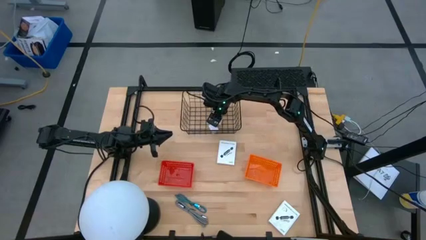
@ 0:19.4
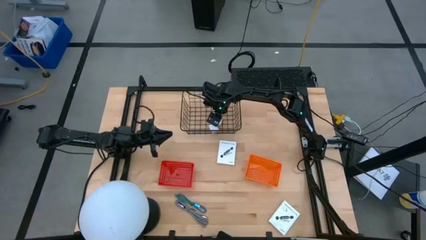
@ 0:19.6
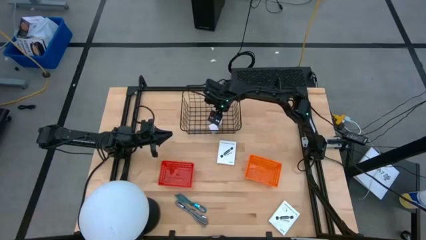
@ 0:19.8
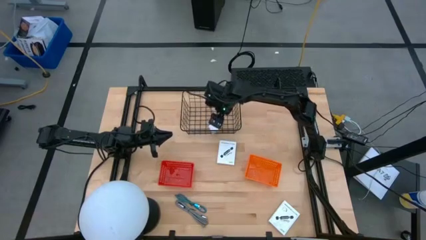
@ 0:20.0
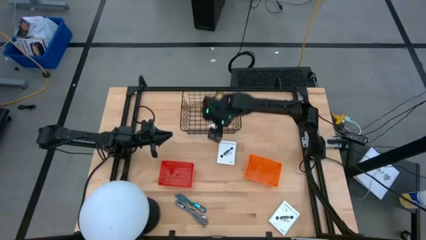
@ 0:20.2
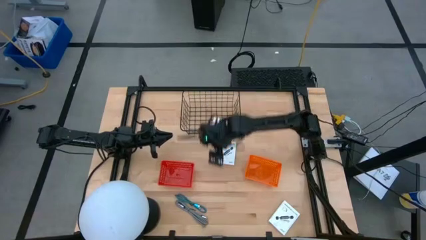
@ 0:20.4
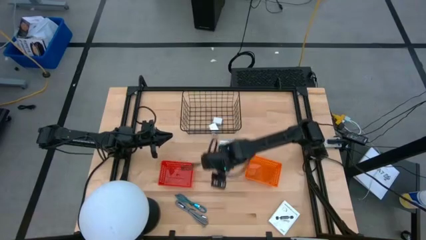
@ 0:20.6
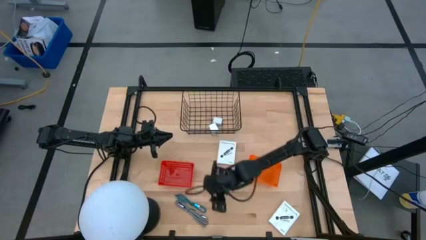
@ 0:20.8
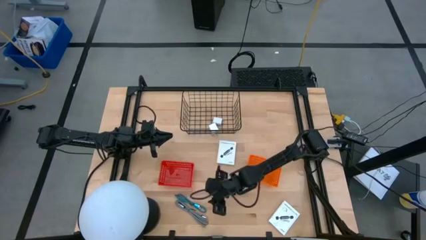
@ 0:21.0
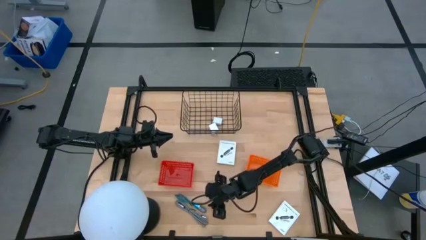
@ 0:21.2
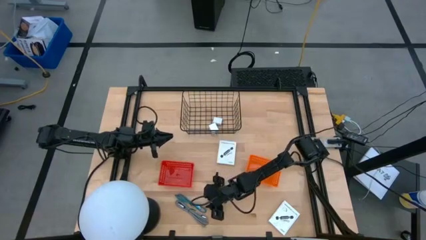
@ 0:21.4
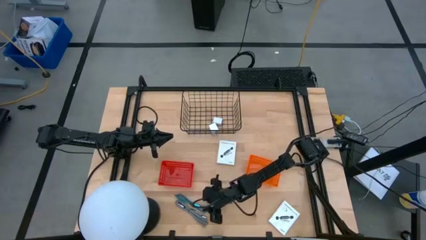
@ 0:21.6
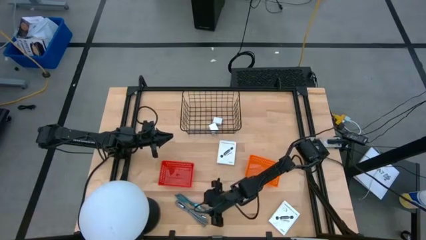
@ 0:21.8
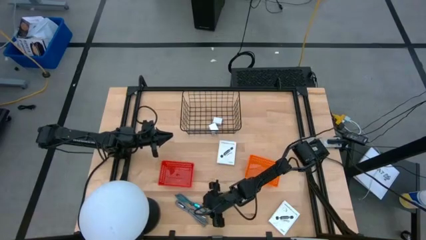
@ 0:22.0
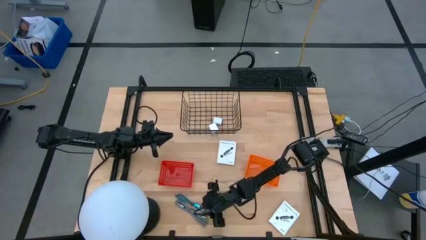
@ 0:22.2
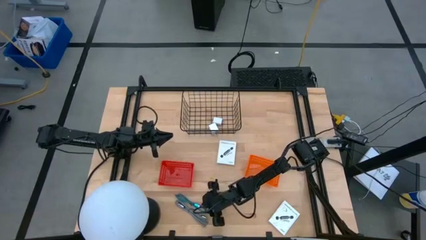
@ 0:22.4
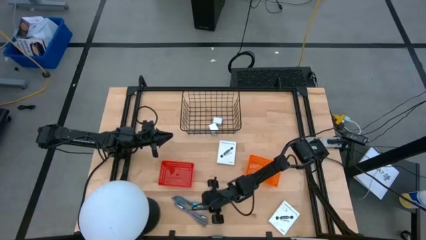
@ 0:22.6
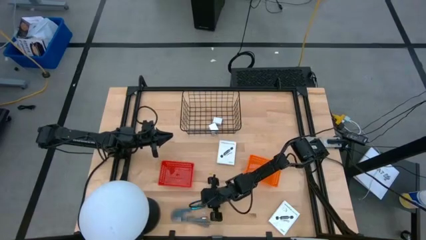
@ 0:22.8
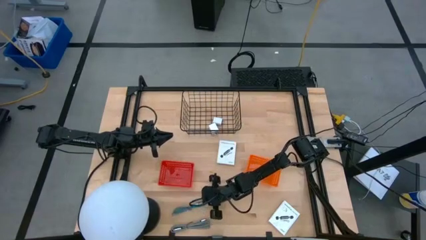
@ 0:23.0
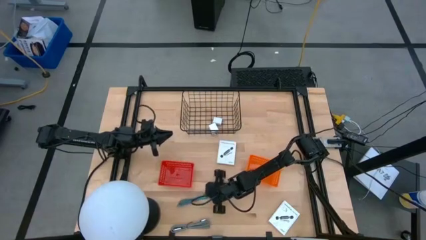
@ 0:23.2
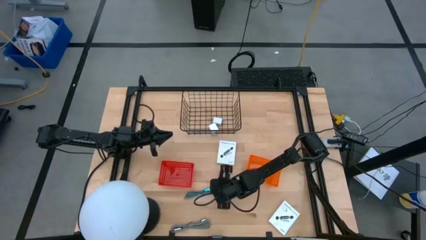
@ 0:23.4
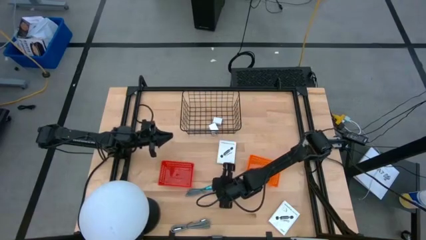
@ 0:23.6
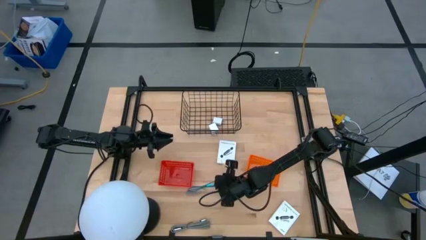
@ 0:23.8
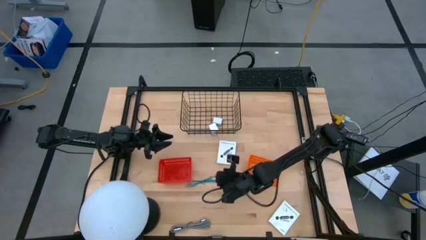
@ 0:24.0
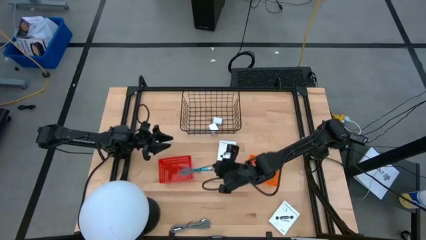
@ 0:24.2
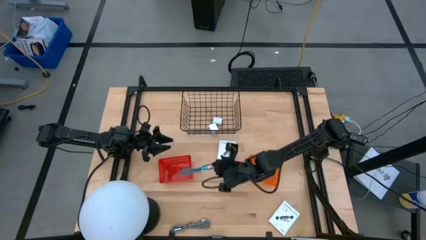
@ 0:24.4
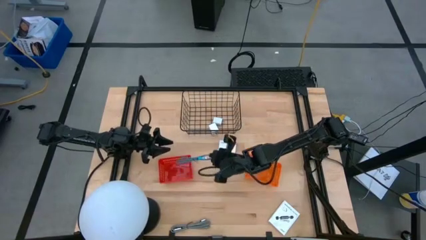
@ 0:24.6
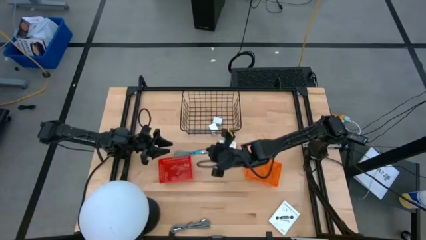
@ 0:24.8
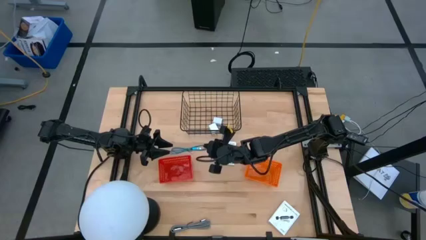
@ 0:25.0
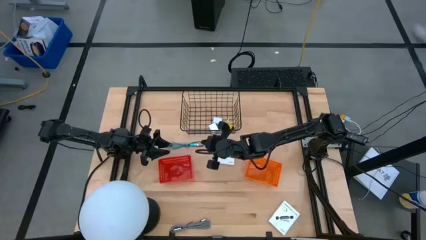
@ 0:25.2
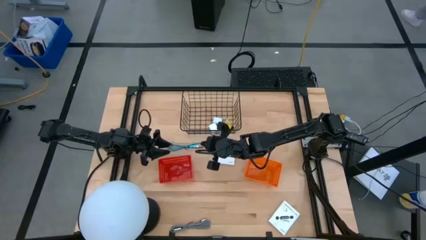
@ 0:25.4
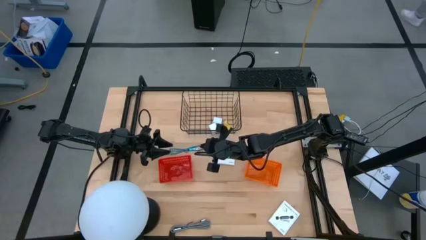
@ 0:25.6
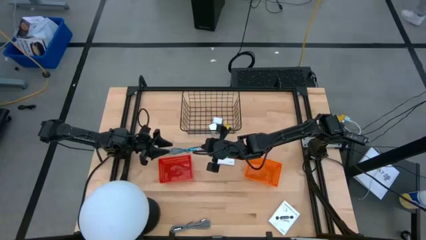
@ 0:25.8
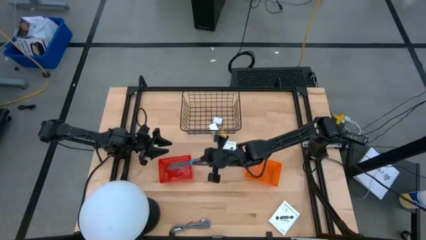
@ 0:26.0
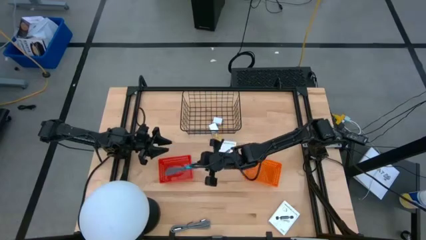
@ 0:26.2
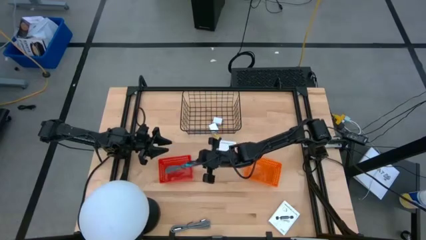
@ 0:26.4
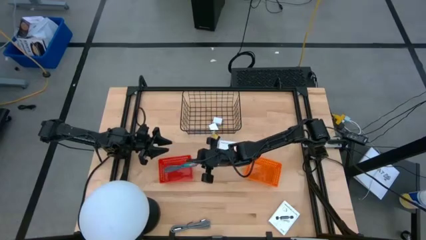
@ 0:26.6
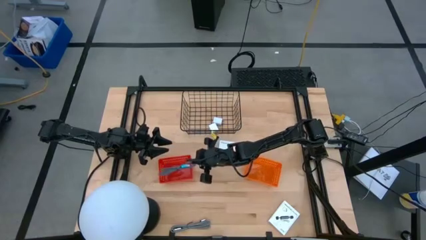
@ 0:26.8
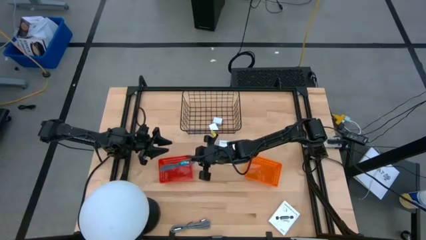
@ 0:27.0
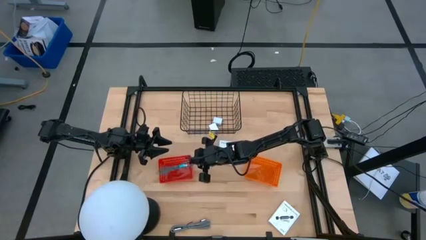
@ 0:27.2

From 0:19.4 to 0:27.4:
Task: Pick and place items into bin
Put the blue charger cable into the red basket

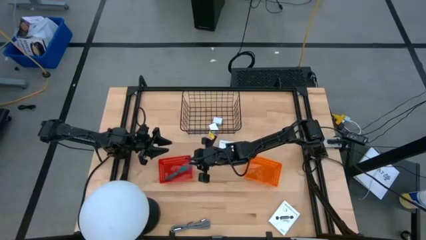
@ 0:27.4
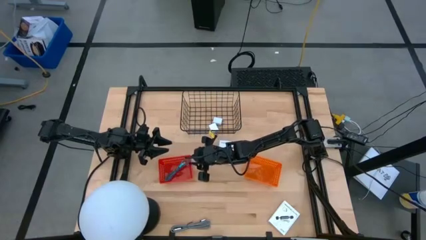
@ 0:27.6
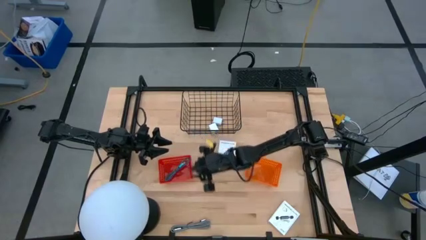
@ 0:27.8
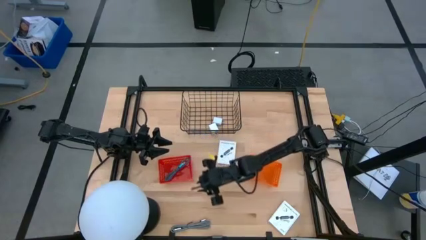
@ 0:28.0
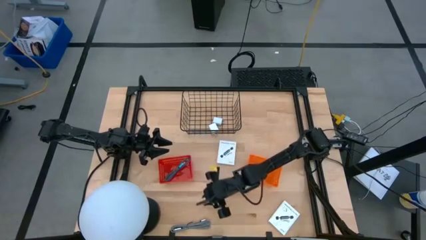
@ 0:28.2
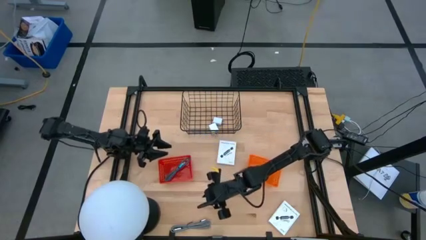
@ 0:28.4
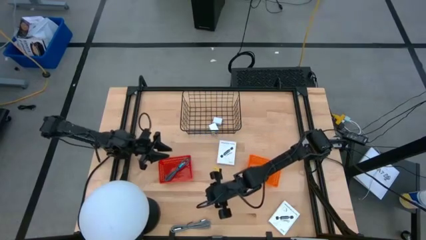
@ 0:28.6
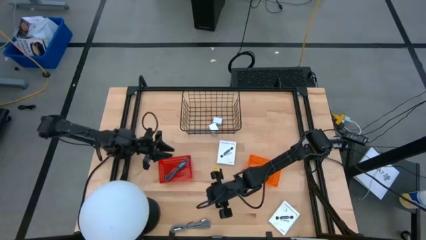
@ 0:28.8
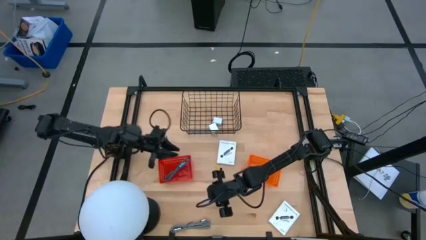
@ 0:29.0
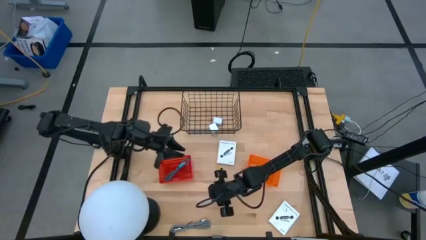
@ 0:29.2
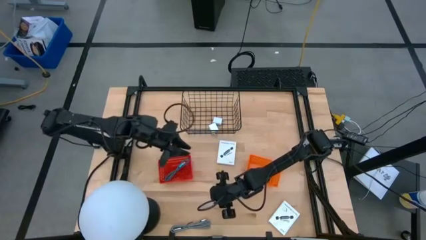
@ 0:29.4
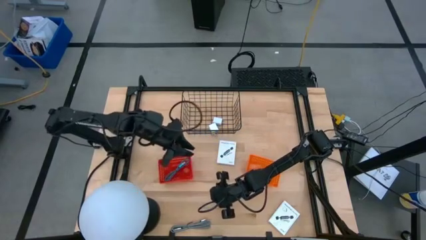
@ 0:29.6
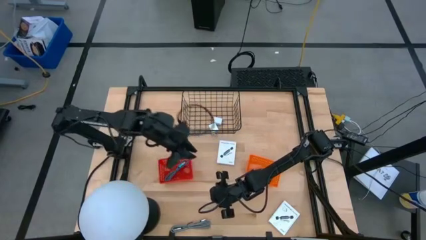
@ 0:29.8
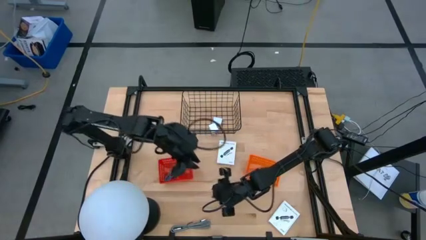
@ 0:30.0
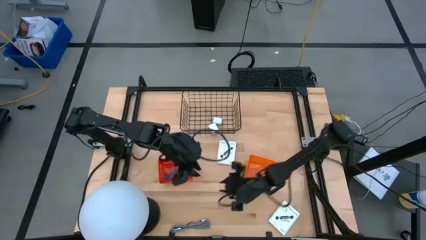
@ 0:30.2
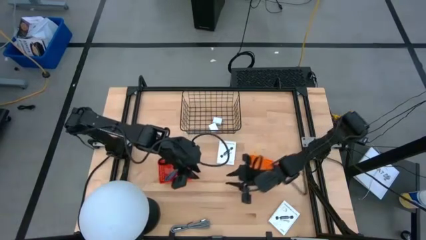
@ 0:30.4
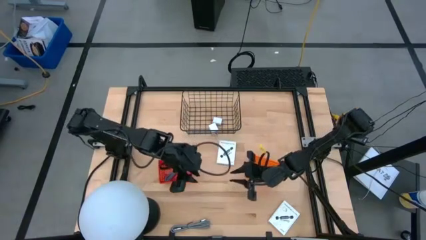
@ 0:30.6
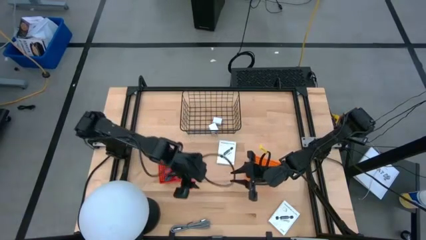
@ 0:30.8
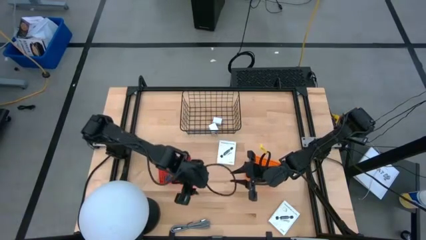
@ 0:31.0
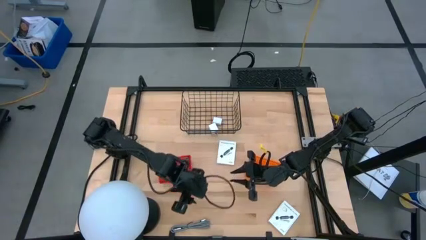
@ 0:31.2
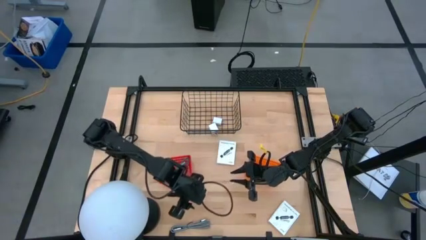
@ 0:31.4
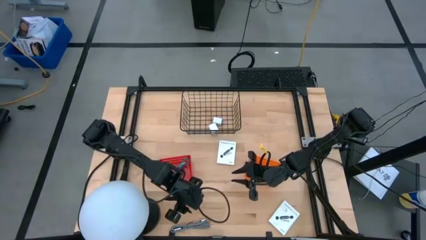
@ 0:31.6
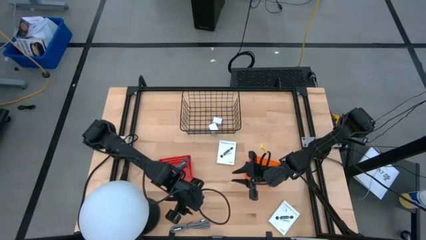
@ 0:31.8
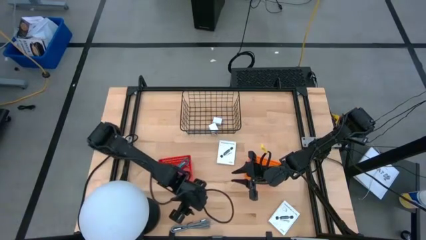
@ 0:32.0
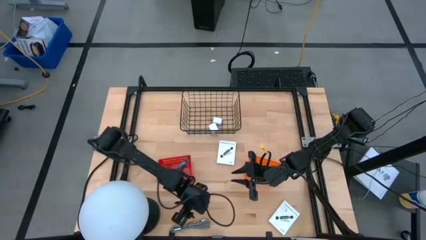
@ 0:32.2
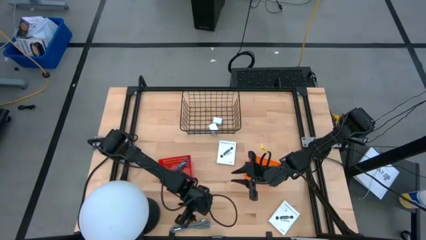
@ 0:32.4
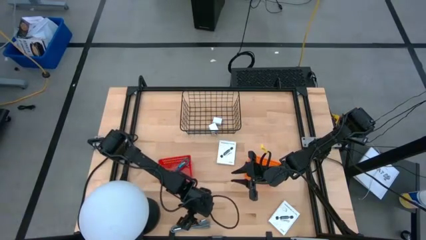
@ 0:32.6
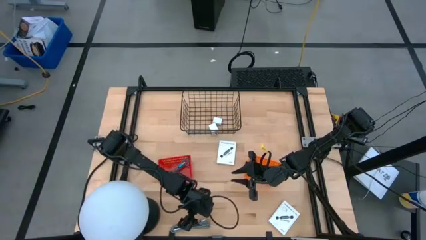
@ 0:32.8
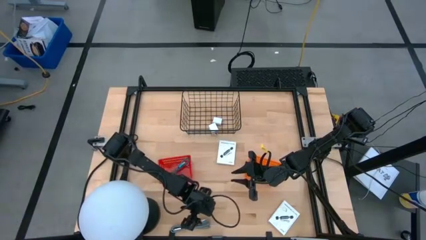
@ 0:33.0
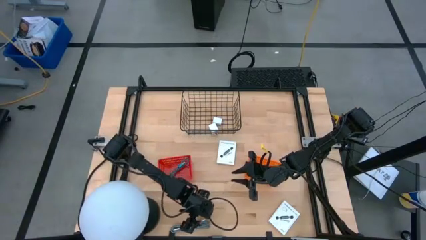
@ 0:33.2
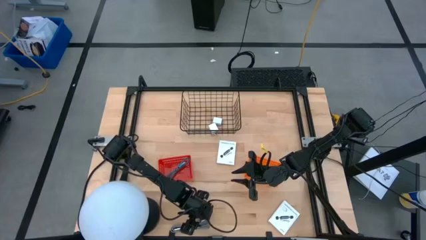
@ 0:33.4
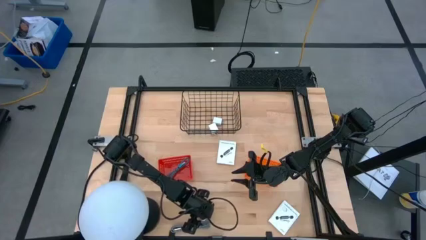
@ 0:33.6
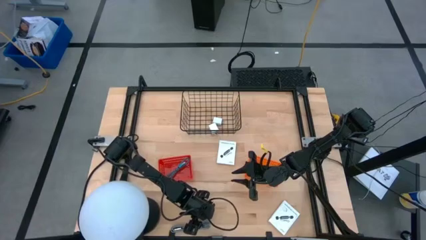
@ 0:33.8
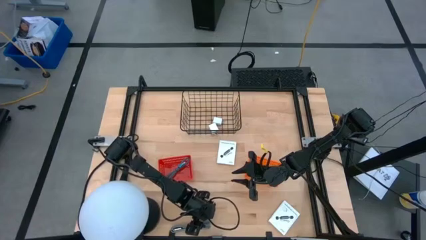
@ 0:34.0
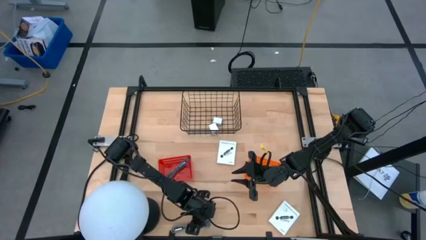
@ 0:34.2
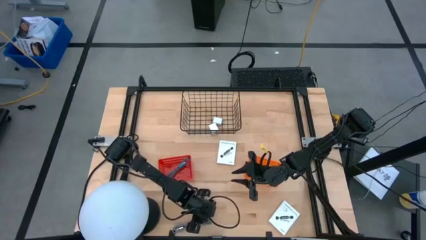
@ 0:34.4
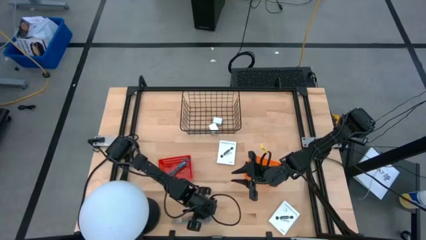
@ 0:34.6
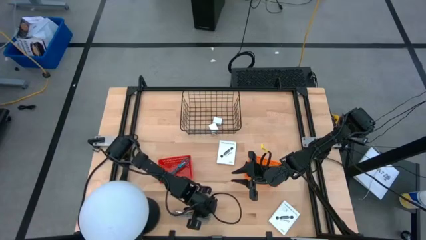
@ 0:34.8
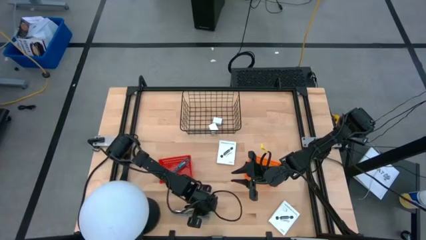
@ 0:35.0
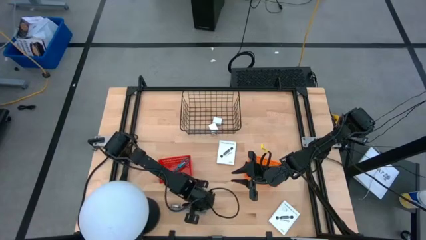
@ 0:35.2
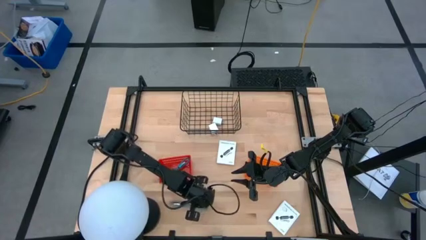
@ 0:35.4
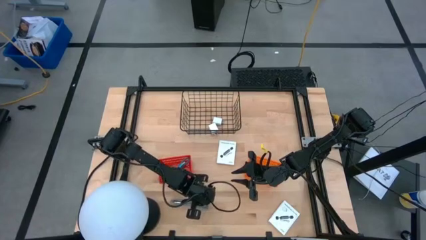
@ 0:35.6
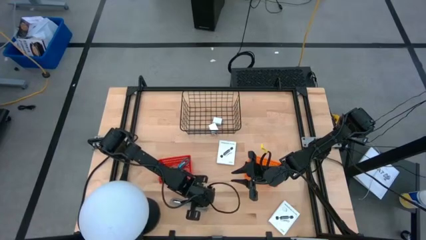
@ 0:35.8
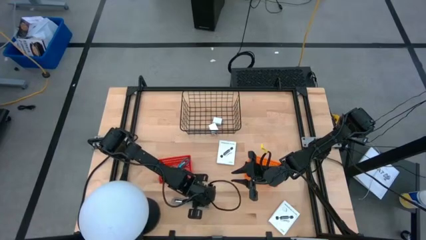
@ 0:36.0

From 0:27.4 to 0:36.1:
Put the gray charger cable into the red basket
